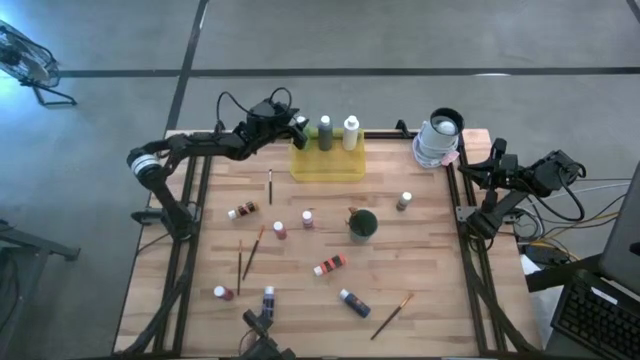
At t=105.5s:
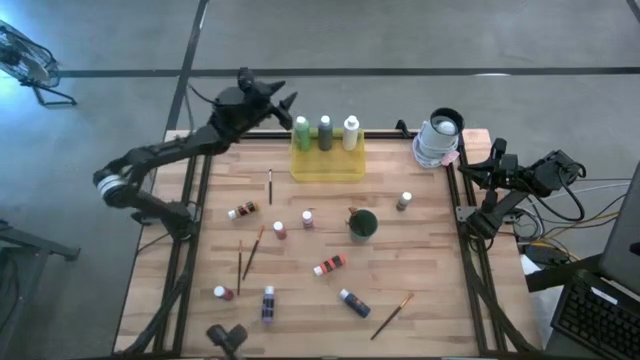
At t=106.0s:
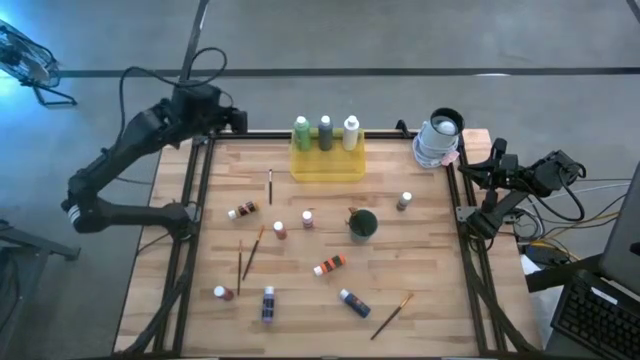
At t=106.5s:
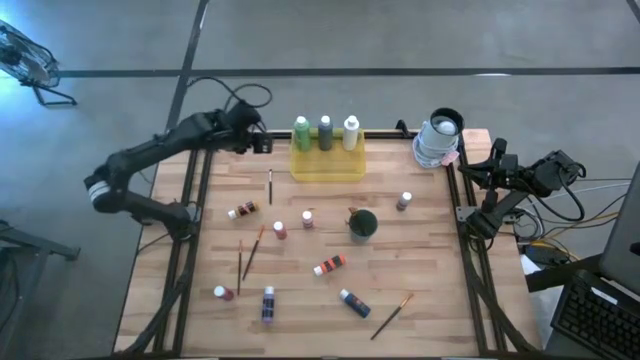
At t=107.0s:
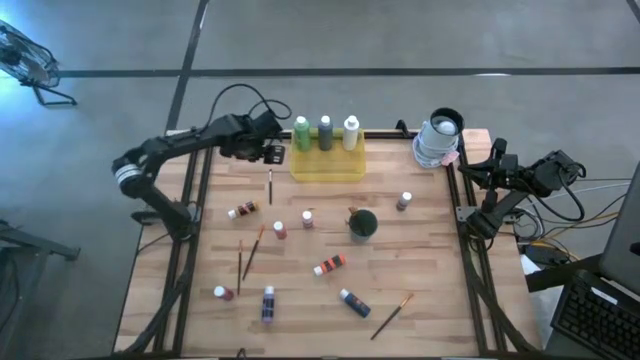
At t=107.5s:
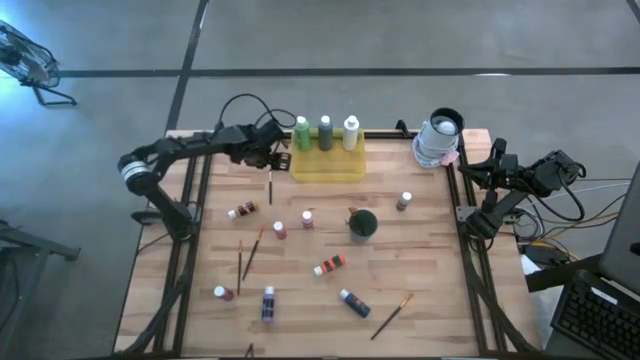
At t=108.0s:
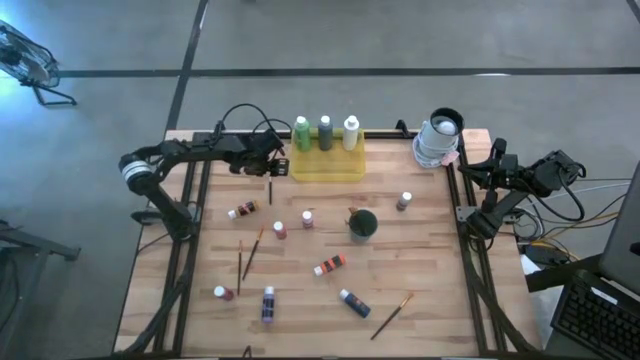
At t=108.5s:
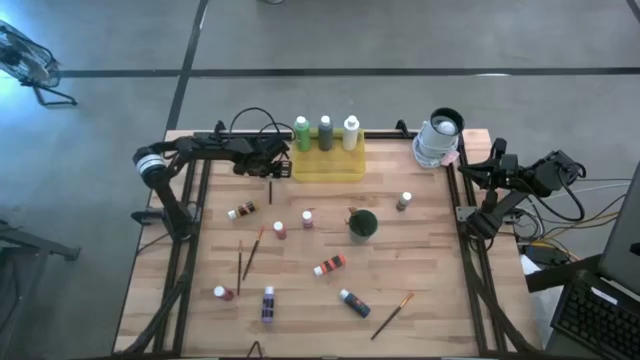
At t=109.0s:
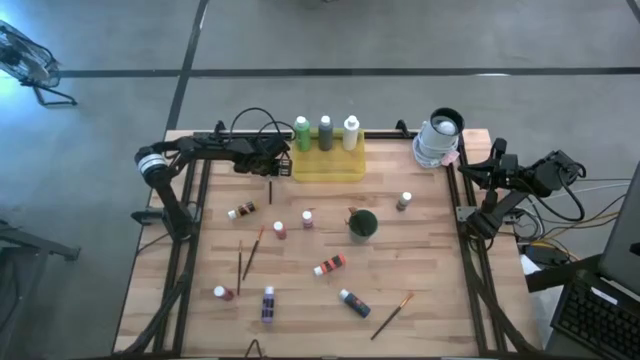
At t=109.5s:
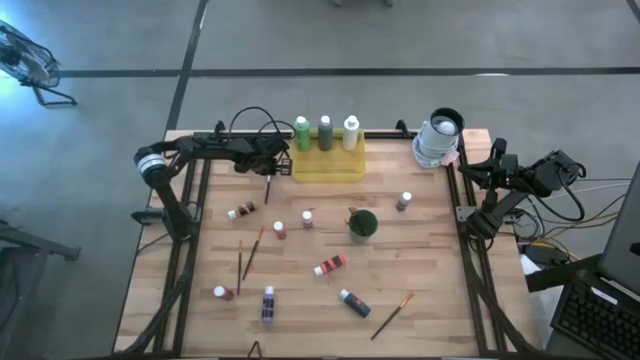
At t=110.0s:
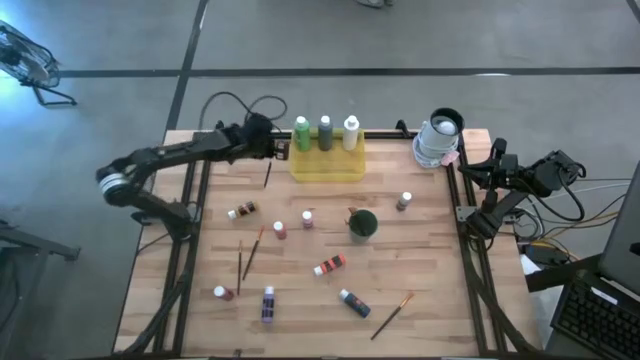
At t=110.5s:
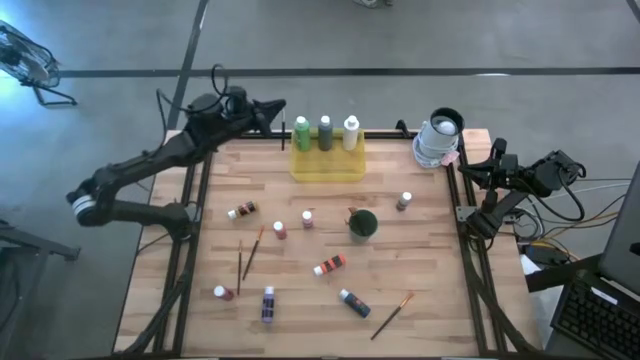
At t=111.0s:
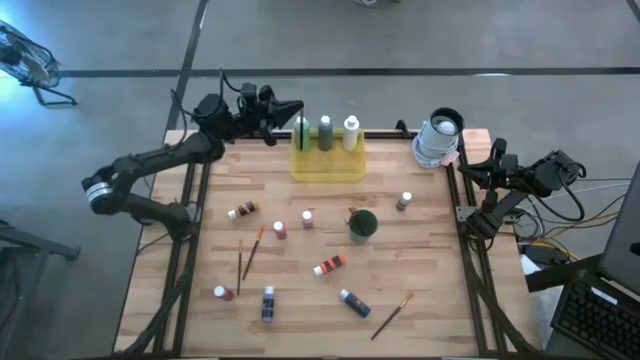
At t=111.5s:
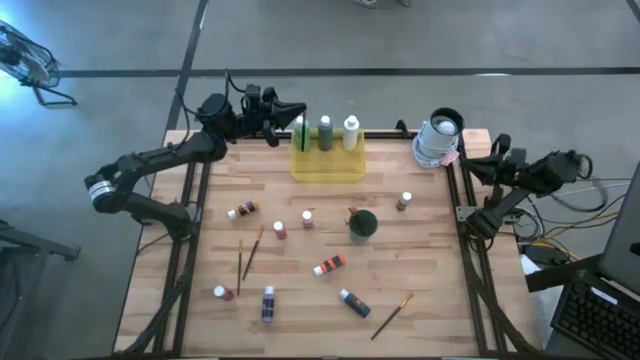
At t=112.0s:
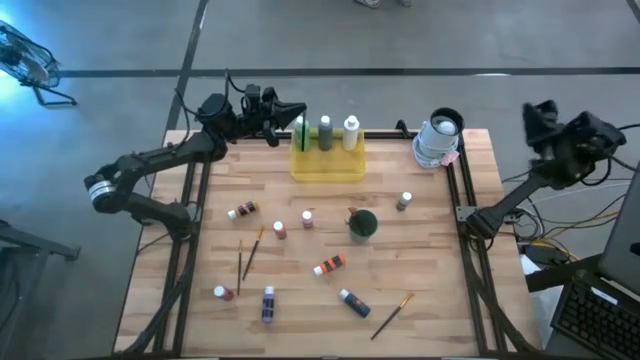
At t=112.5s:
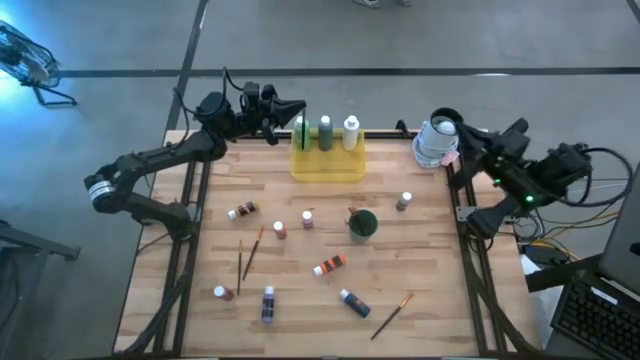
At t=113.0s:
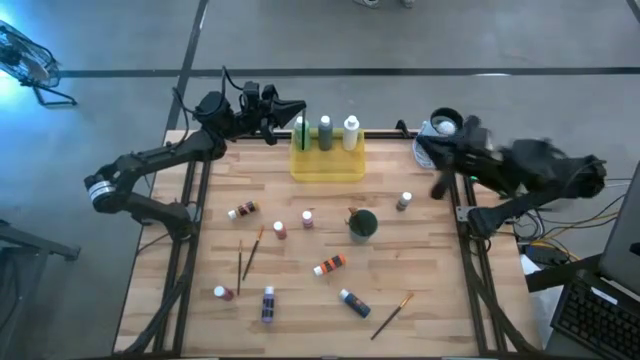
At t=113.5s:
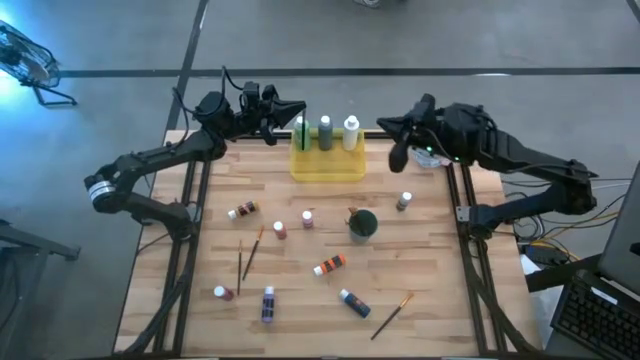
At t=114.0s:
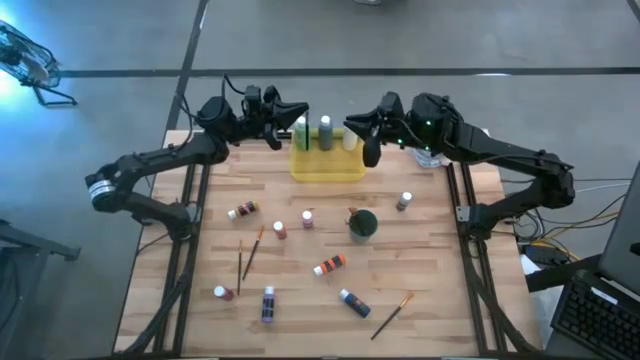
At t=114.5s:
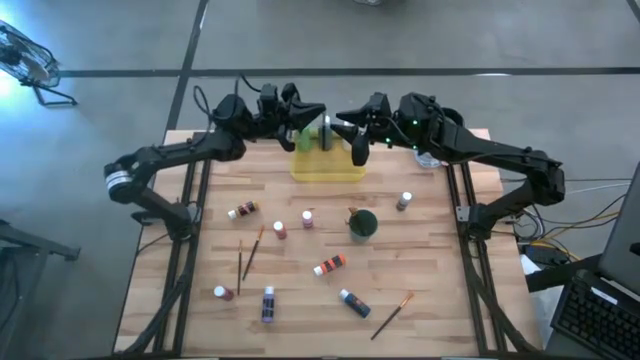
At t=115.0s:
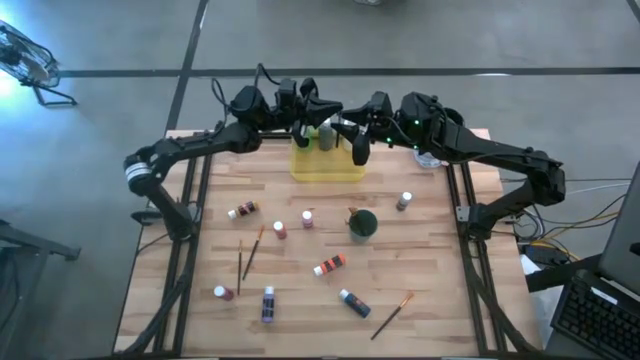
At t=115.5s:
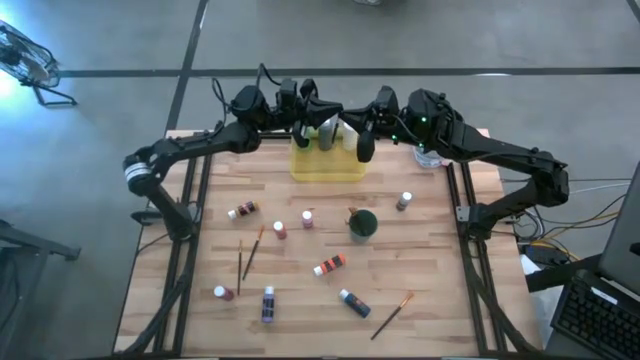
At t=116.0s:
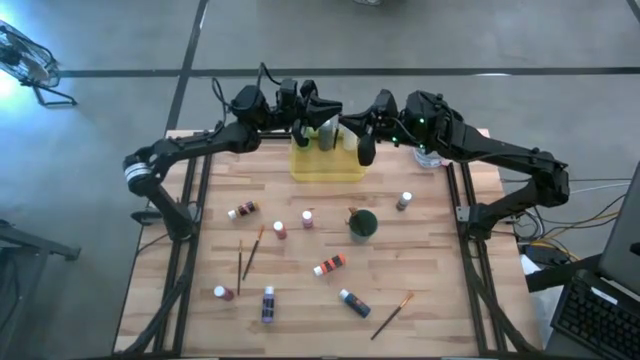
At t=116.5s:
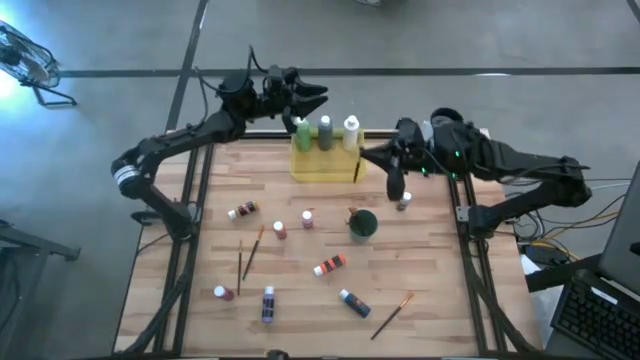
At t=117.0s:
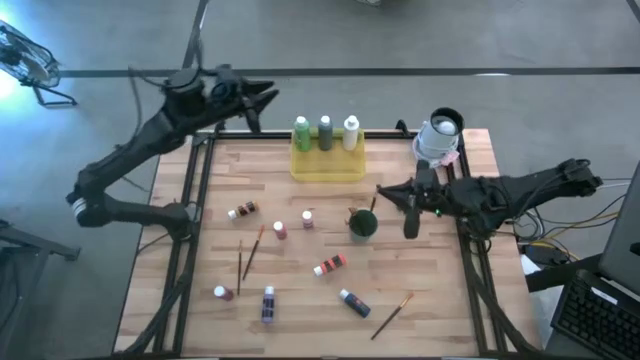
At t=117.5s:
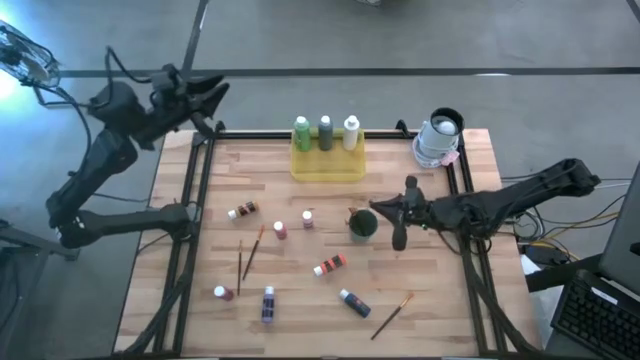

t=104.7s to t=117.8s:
Task: Pick & Place Paint Supplies
Put the silver paint brush into the green cup

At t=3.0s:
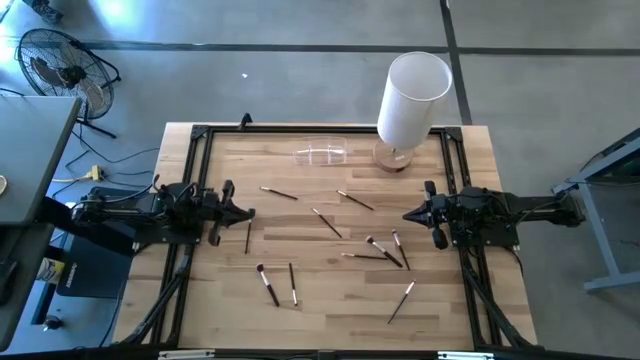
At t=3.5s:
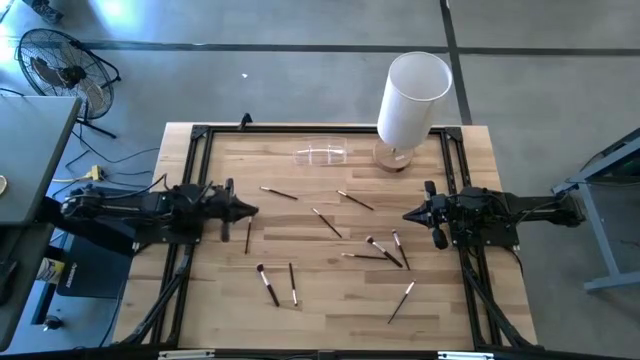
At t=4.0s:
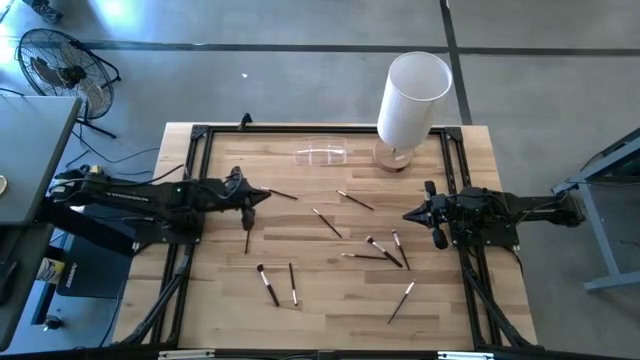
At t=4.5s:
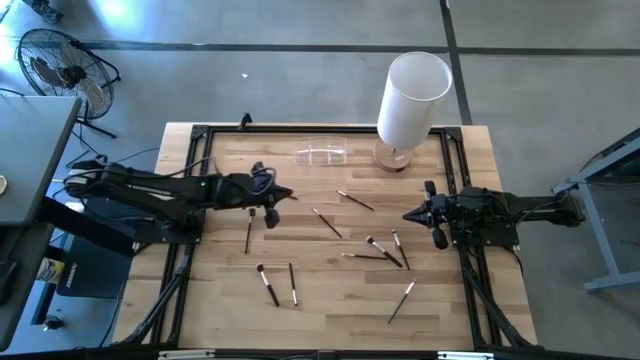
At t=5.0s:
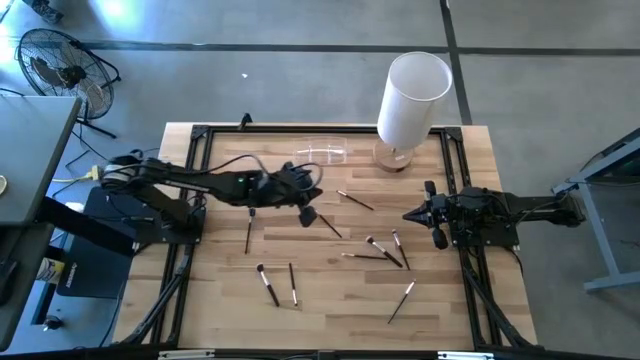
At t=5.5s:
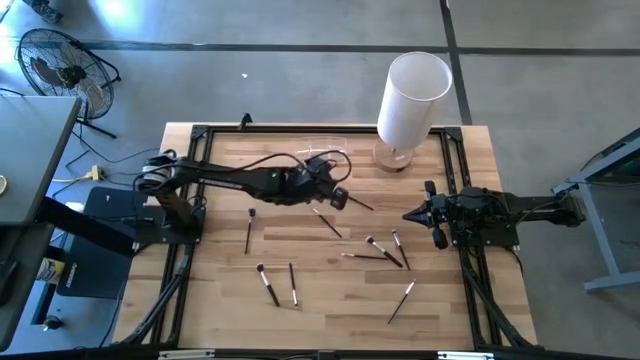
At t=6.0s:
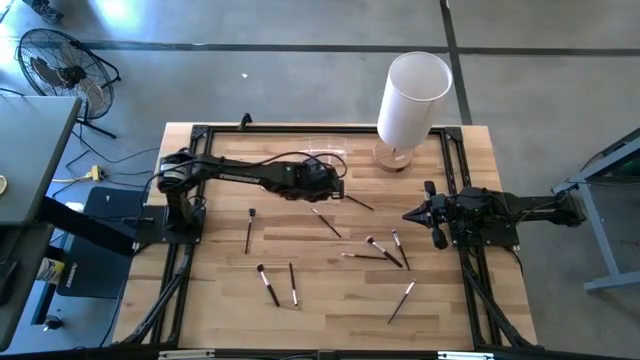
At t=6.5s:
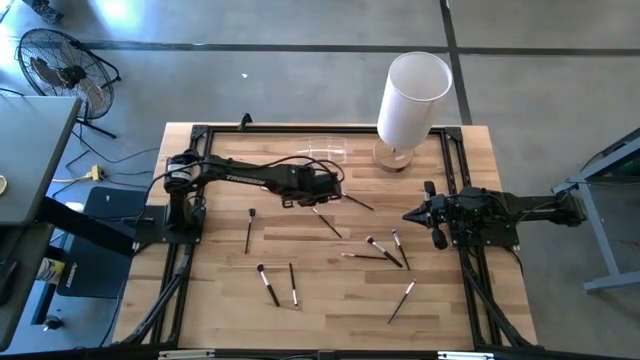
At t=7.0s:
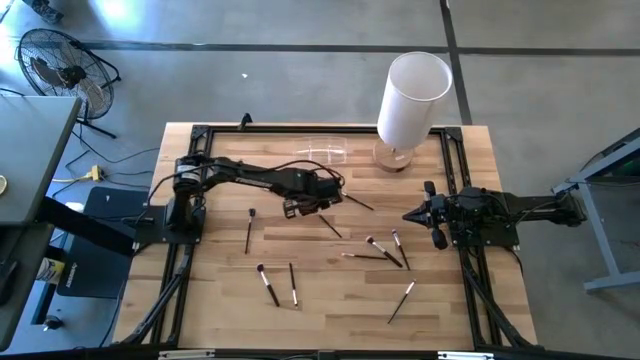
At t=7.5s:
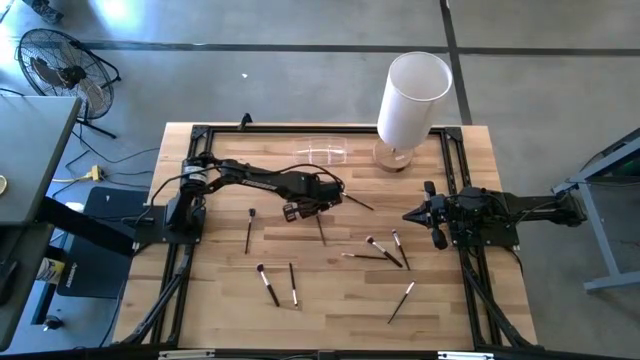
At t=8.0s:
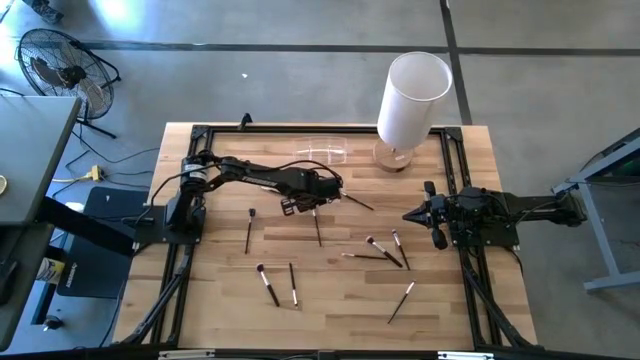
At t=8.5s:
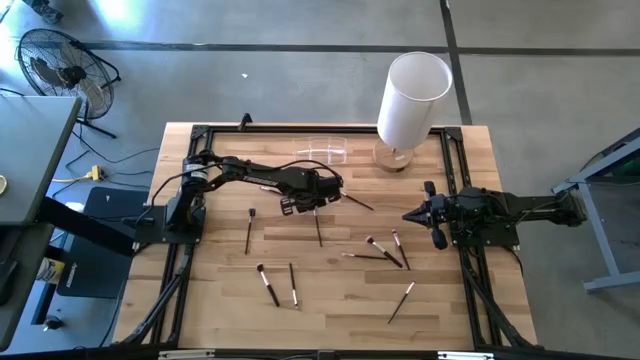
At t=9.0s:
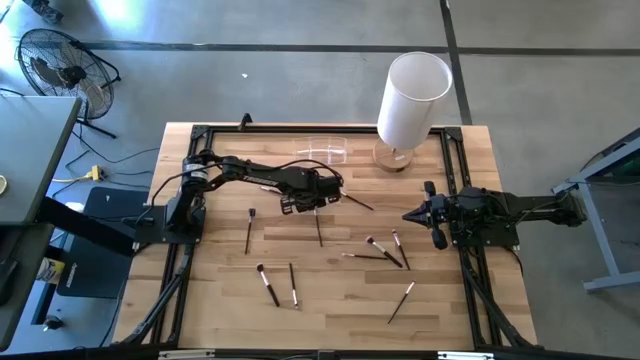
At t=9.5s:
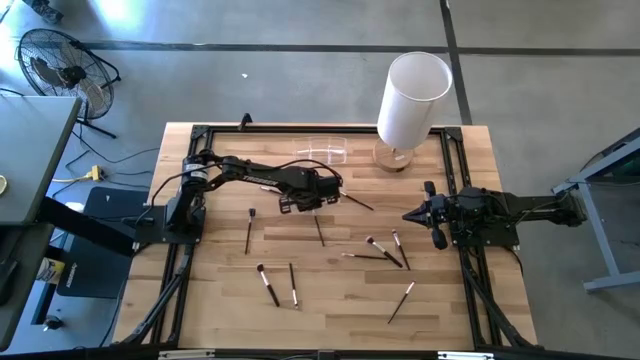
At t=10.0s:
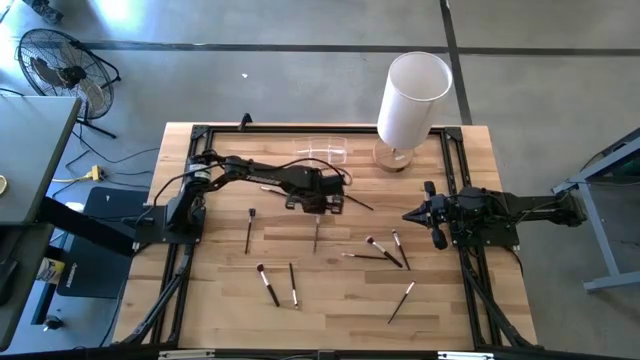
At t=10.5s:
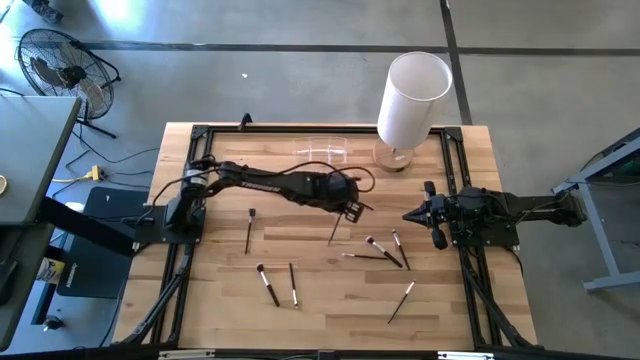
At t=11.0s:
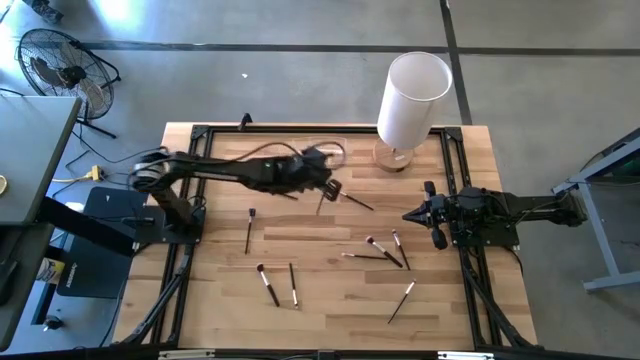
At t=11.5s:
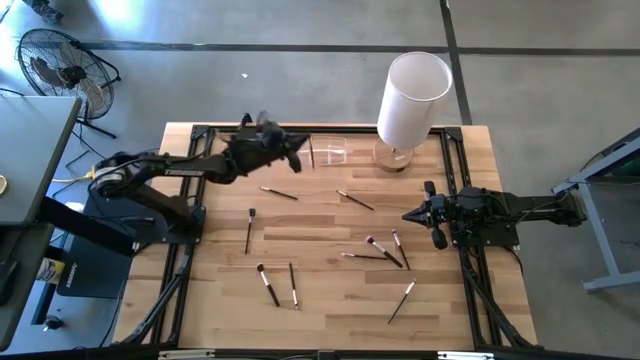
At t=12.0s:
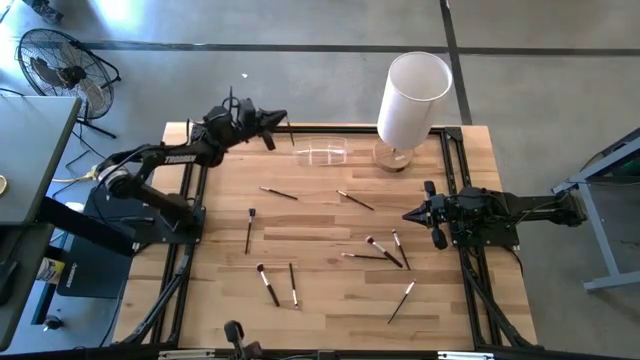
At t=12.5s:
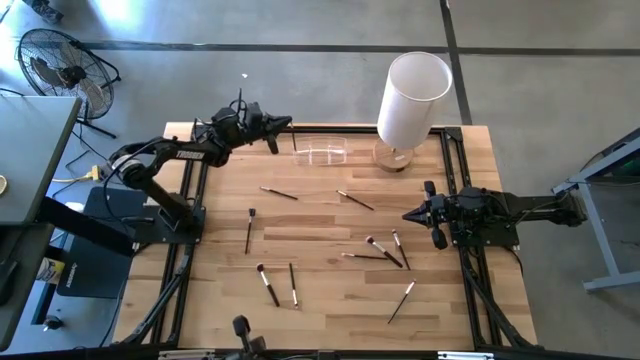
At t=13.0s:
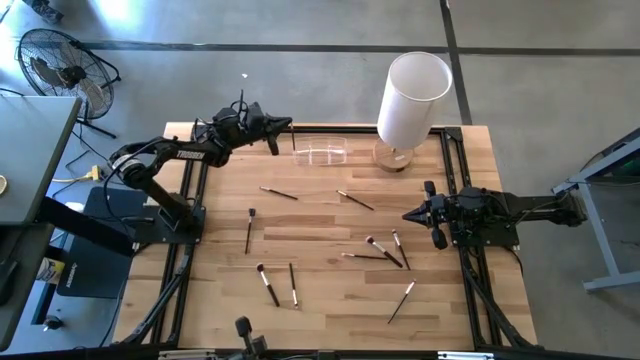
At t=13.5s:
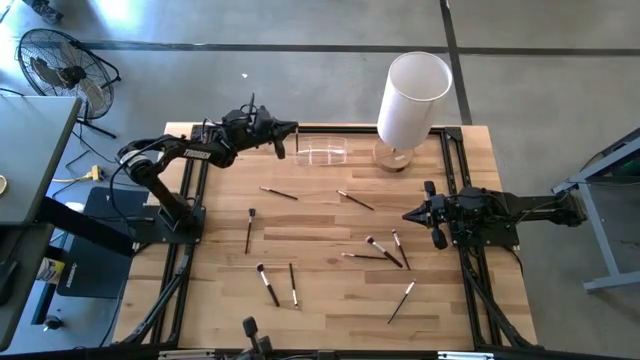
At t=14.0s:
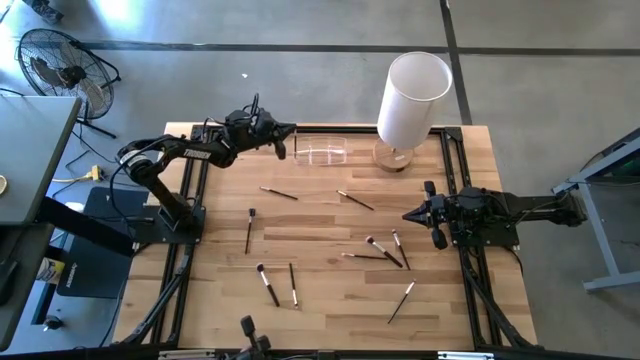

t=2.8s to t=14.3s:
Task: Put items in baskets/containers
Put the black eyeshadow brush into the transparent organizer
